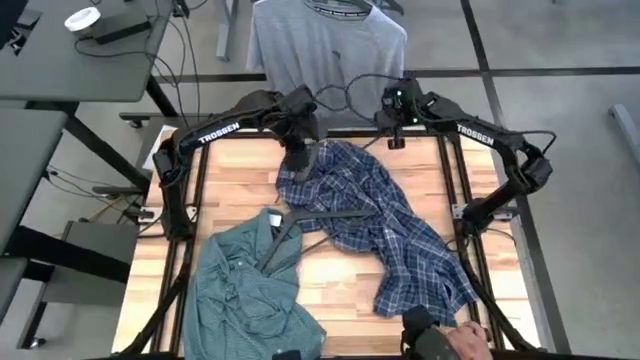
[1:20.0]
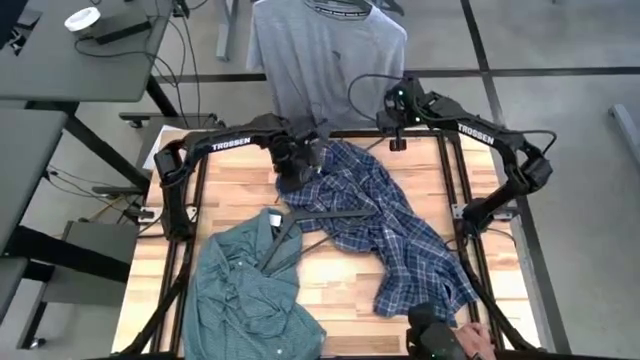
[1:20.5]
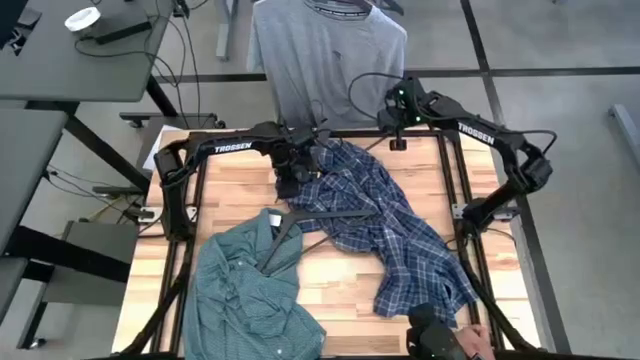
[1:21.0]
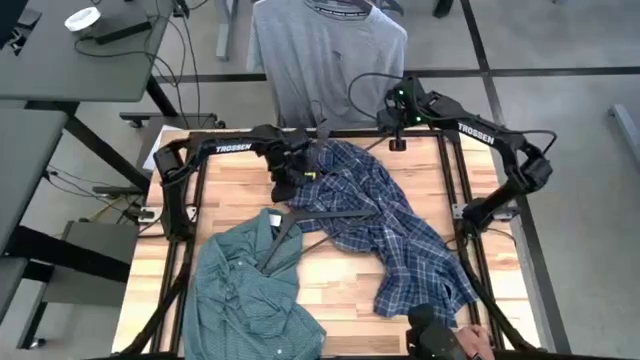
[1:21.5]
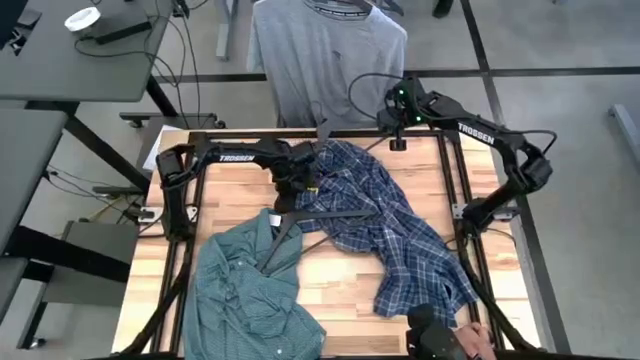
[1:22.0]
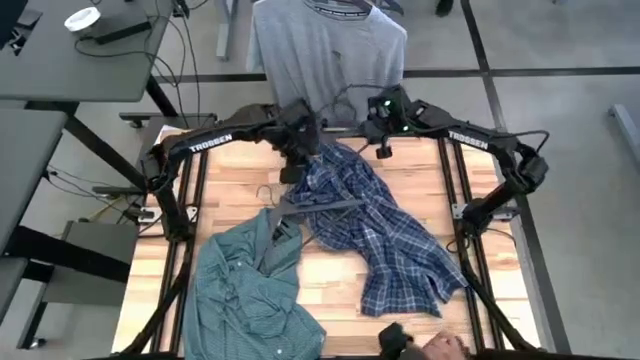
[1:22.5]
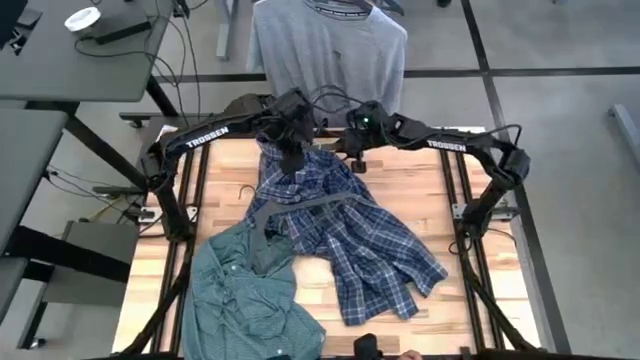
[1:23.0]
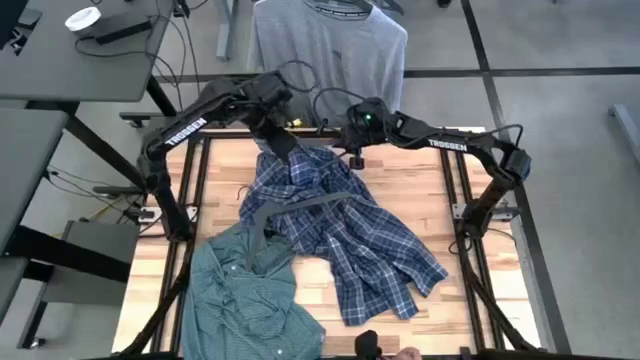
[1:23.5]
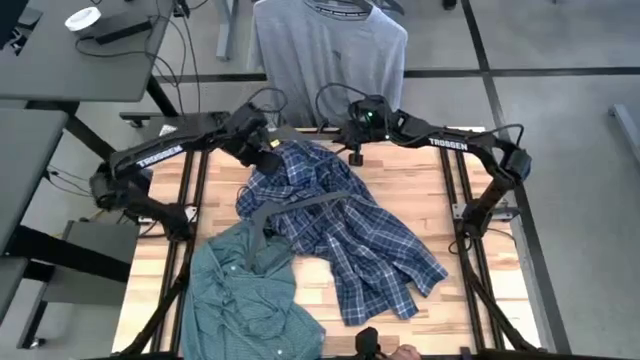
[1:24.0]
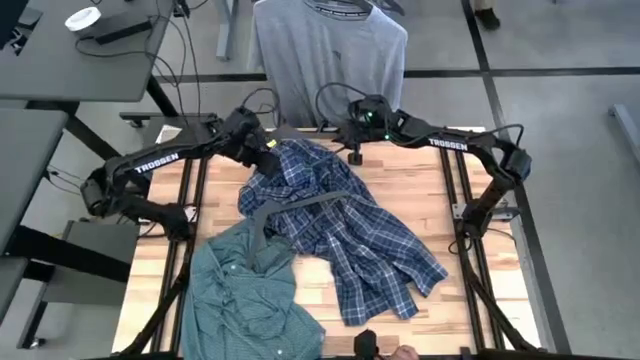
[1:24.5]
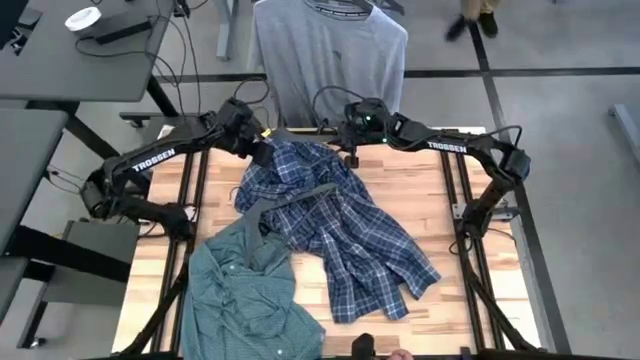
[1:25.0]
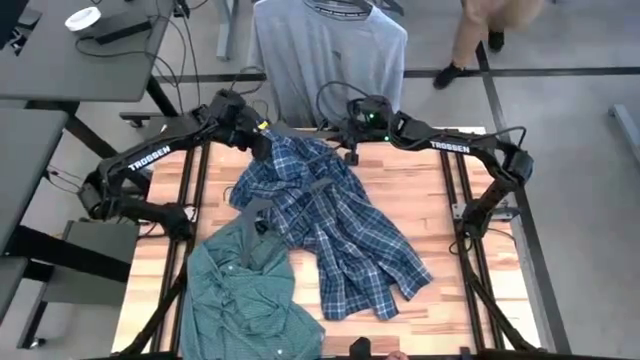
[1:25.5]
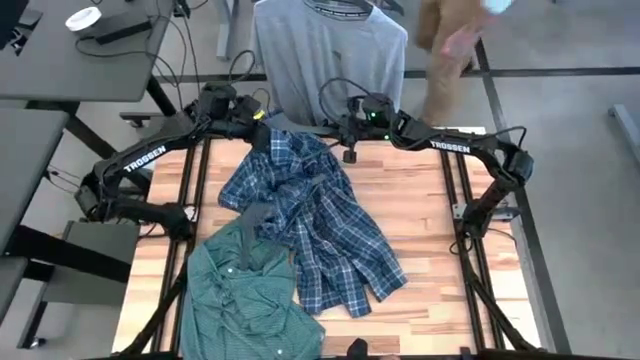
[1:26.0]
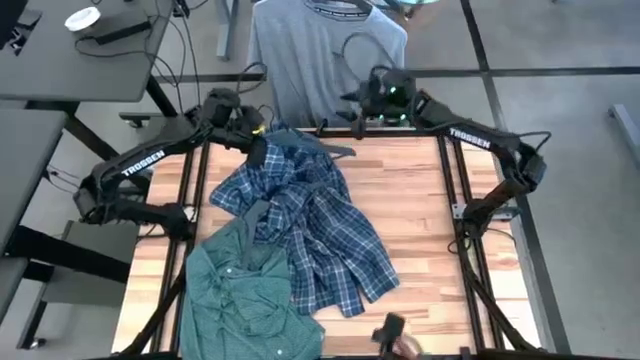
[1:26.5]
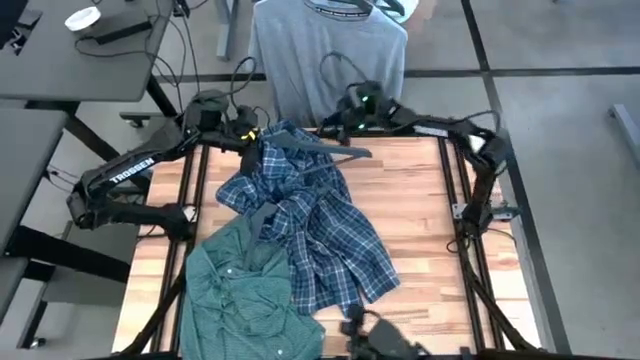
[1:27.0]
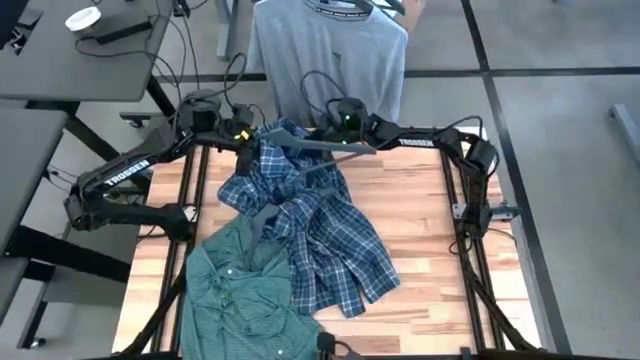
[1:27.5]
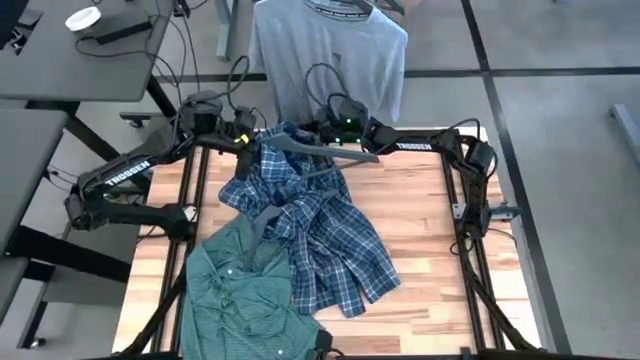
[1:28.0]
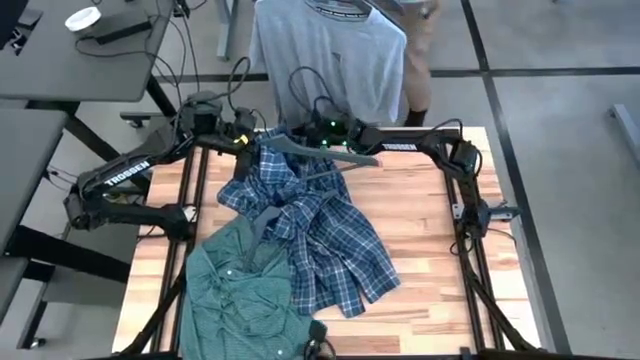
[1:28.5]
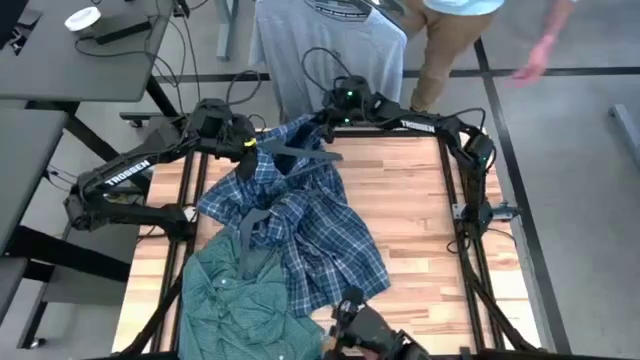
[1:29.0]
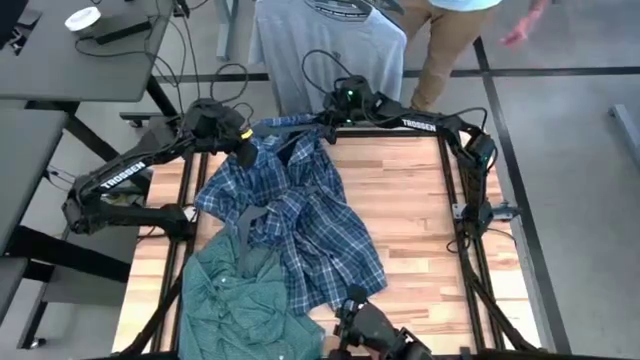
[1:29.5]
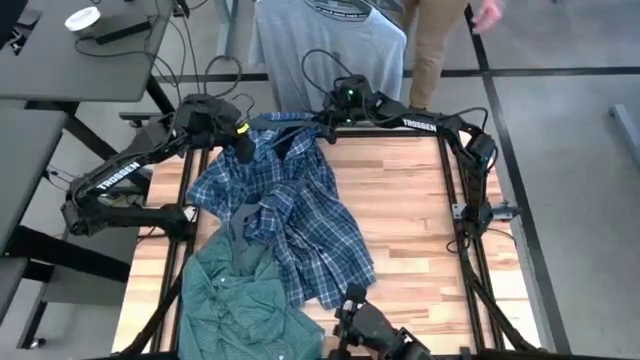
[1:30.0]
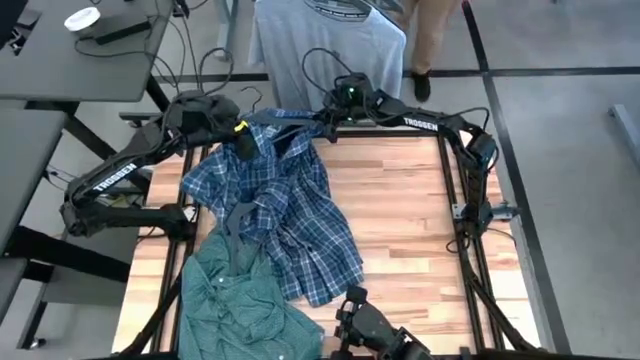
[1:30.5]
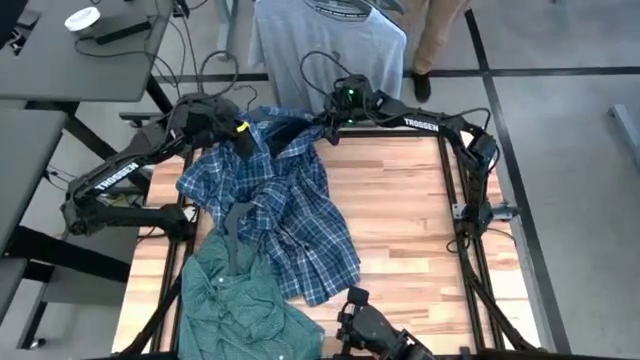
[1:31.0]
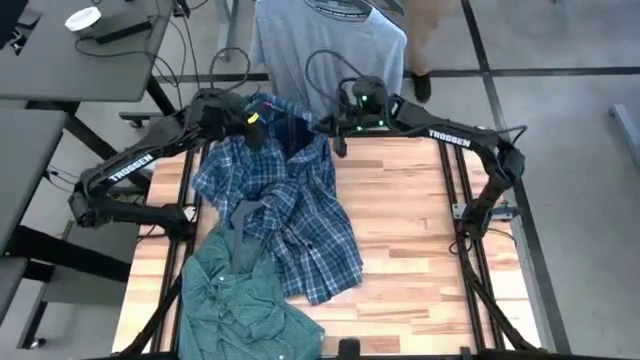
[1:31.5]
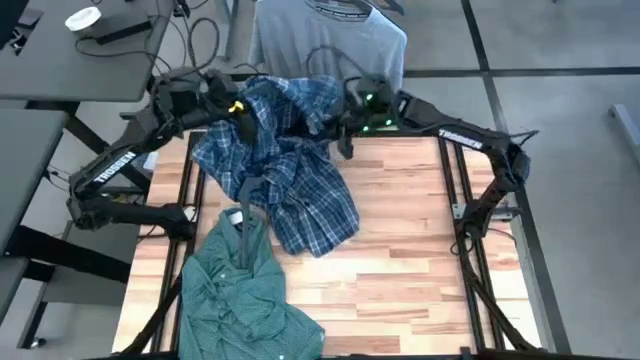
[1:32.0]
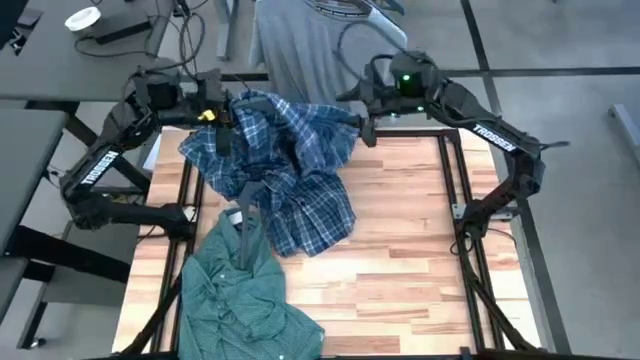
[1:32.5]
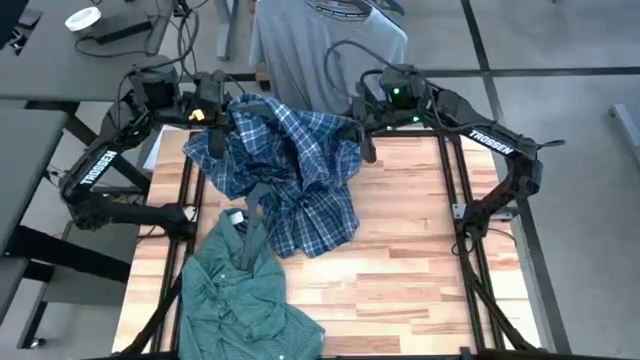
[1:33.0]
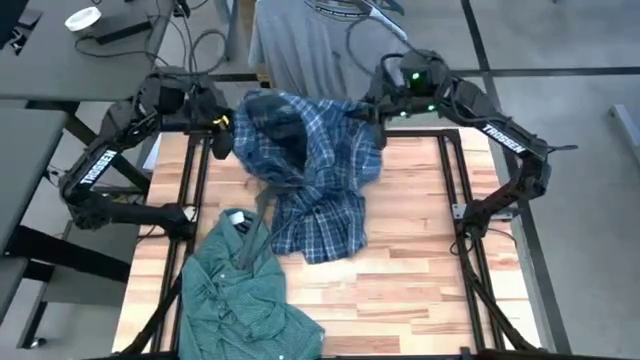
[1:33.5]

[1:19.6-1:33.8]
Task: Hang clothes
Put the blue polo shirt on the gray hanger

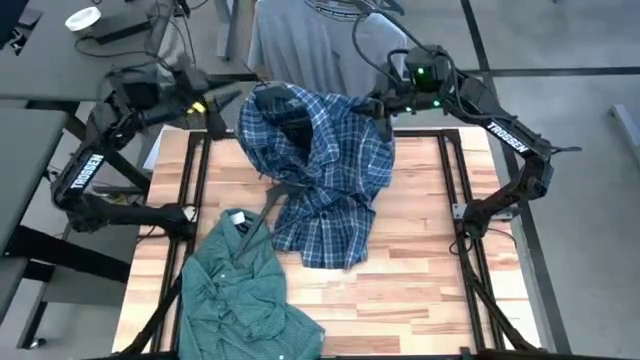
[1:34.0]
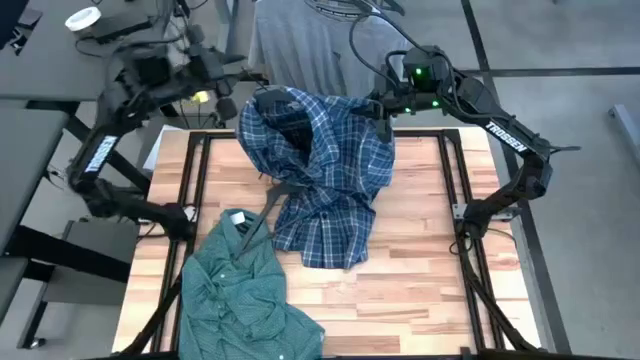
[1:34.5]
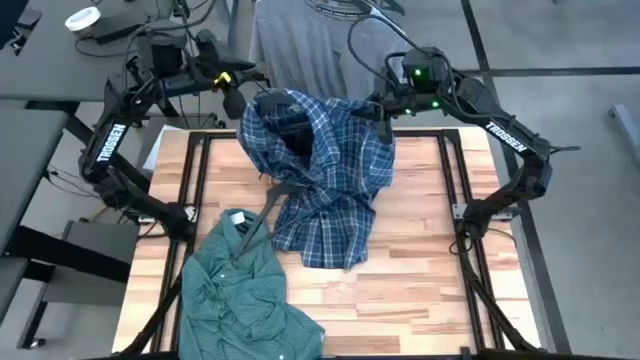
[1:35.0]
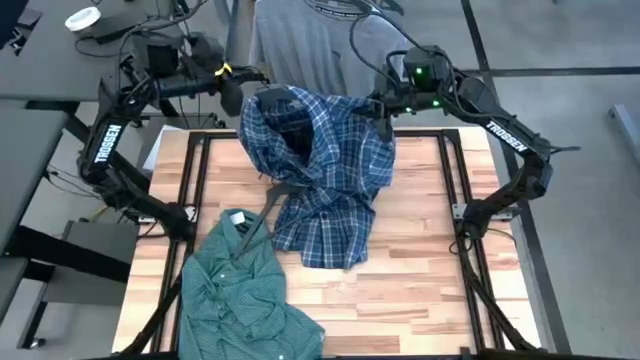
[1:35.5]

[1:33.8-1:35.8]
Hang the blue polo shirt on the hanger rack

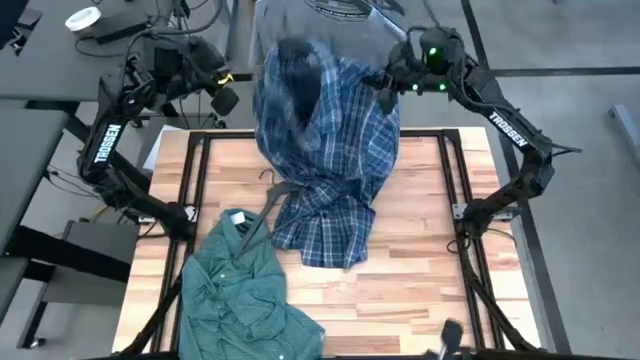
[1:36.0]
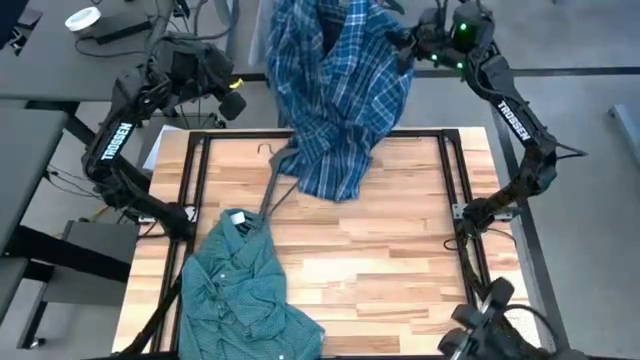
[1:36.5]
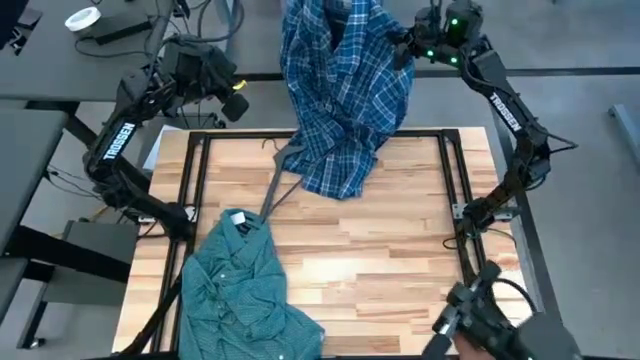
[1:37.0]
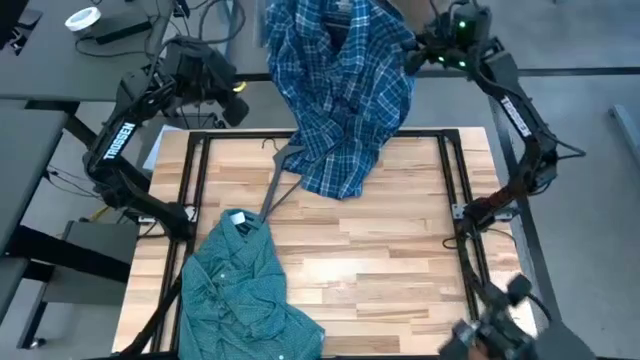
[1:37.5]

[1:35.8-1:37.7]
Hang the blue polo shirt on the hanger rack

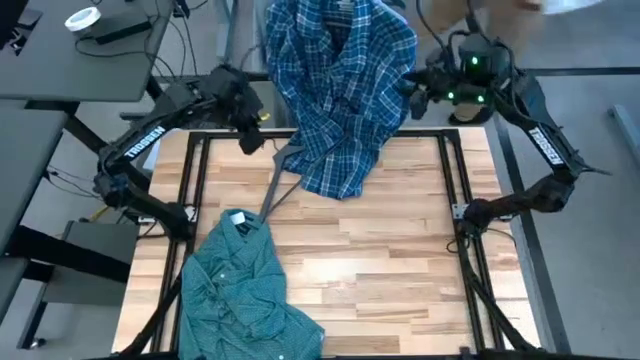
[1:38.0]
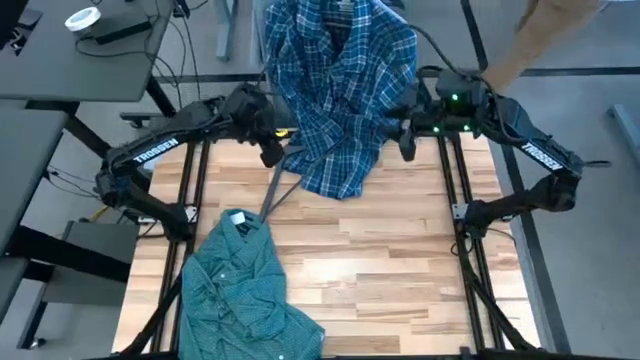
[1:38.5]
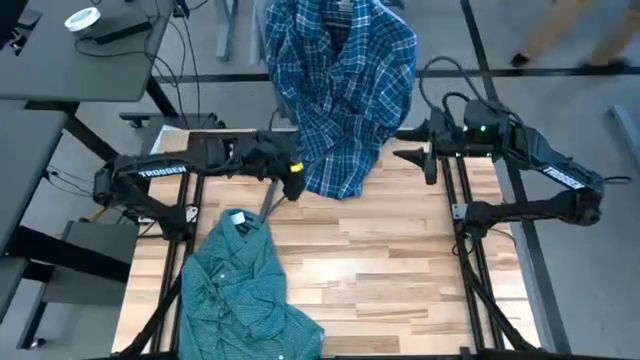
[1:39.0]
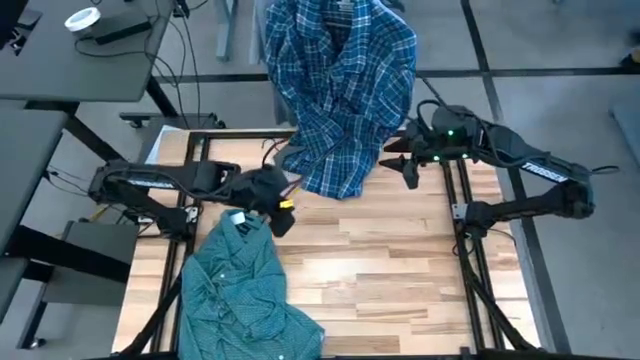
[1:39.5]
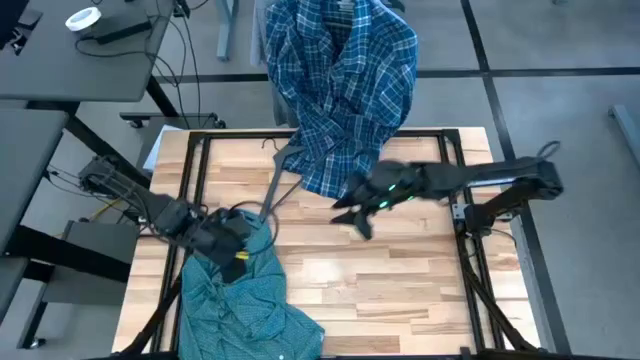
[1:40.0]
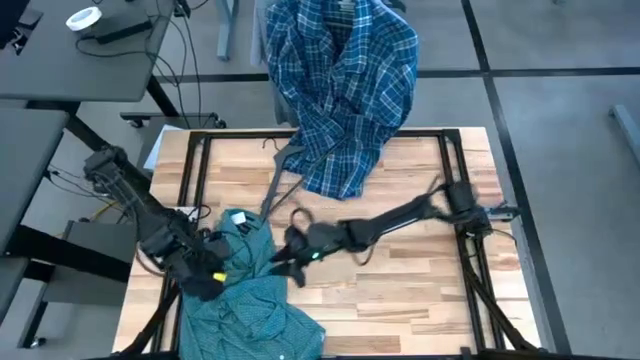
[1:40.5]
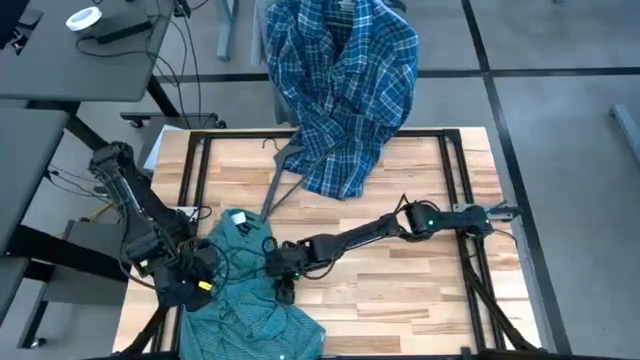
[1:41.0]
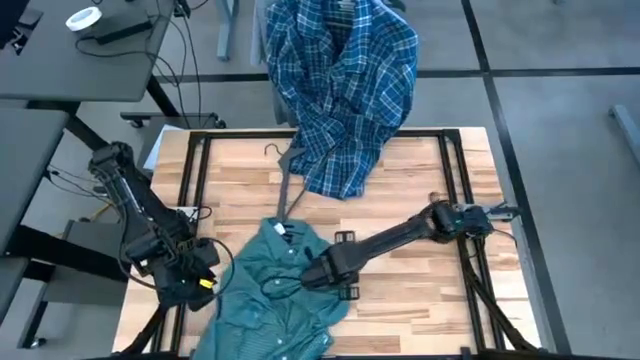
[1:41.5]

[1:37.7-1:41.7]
Put the green polo shirt on the gray hanger
